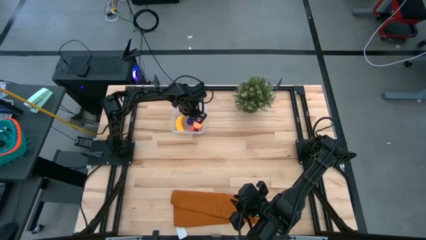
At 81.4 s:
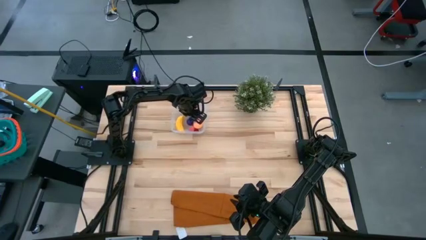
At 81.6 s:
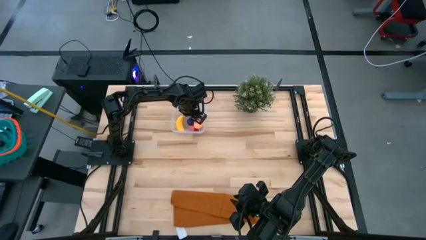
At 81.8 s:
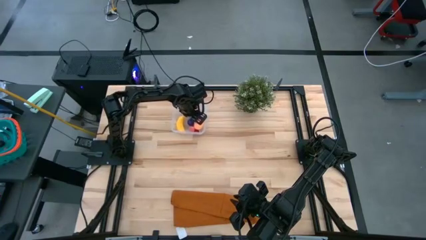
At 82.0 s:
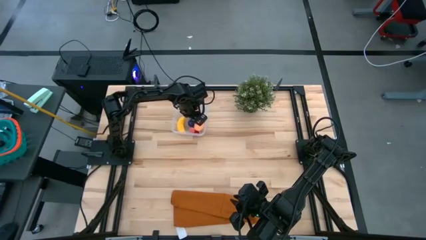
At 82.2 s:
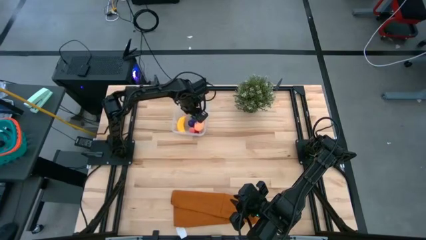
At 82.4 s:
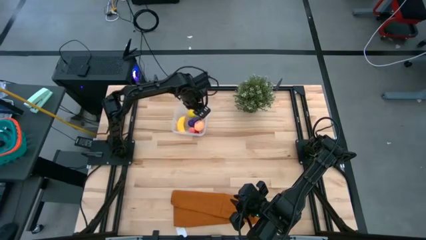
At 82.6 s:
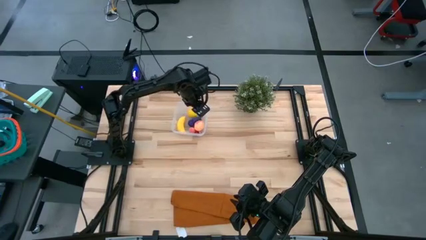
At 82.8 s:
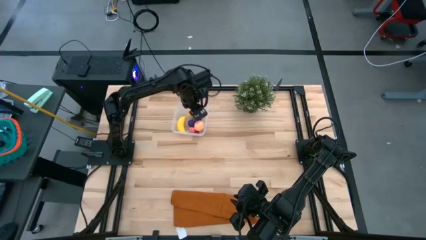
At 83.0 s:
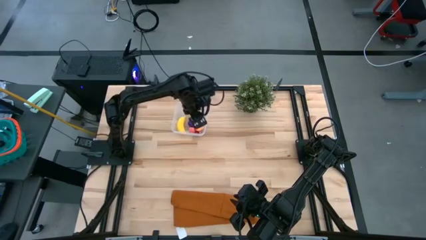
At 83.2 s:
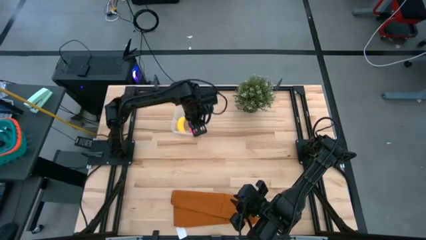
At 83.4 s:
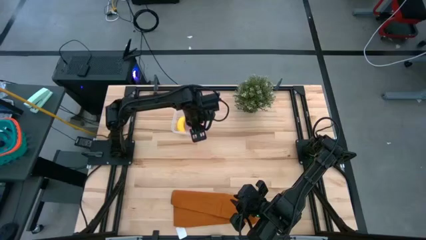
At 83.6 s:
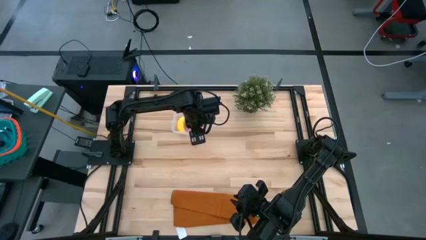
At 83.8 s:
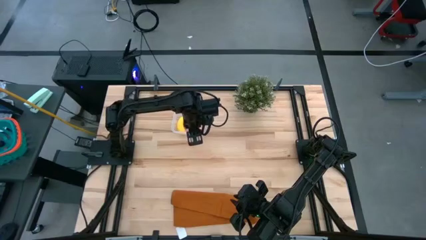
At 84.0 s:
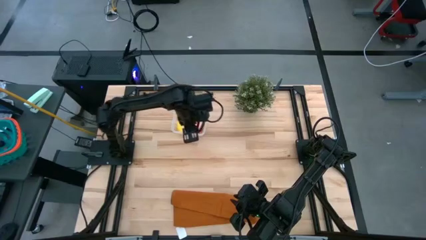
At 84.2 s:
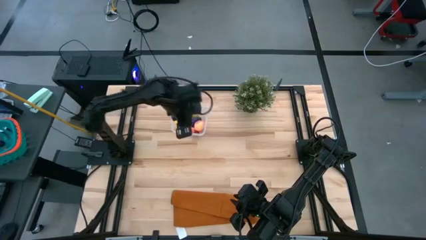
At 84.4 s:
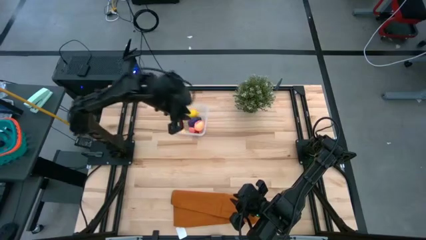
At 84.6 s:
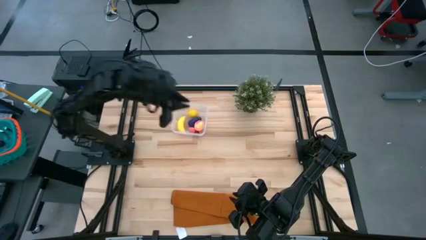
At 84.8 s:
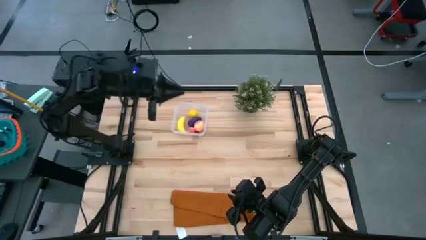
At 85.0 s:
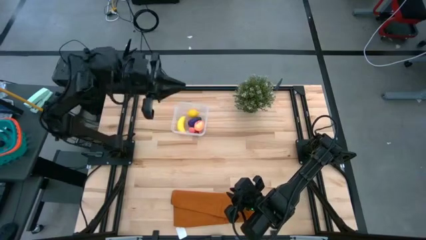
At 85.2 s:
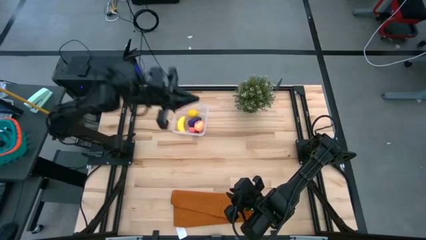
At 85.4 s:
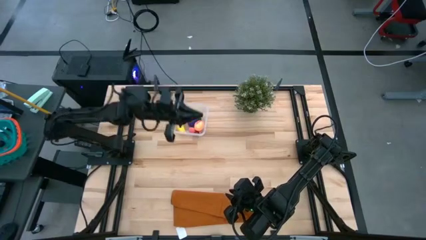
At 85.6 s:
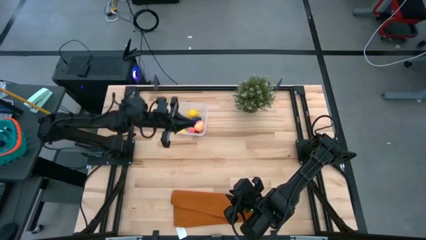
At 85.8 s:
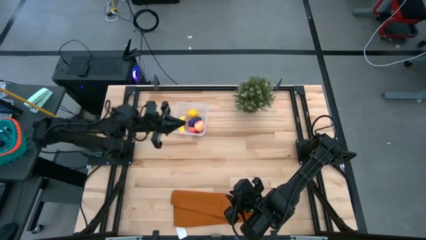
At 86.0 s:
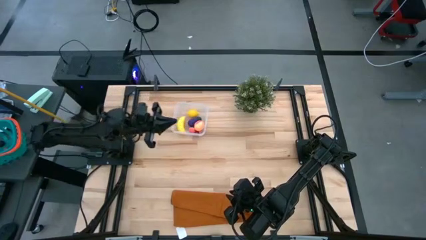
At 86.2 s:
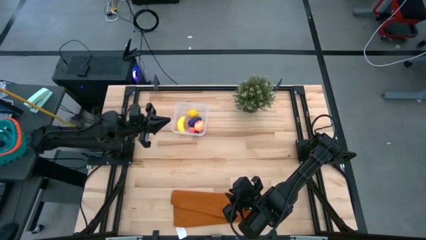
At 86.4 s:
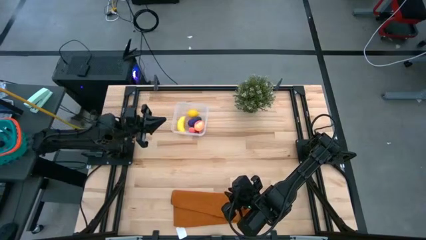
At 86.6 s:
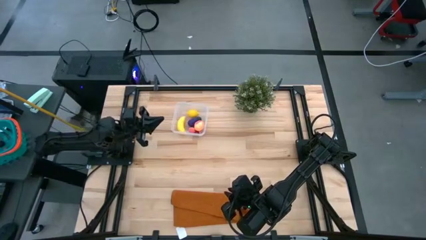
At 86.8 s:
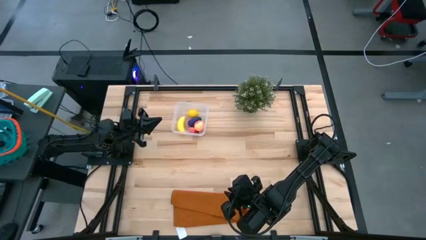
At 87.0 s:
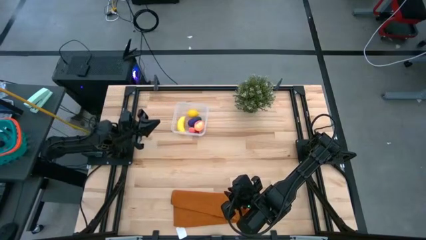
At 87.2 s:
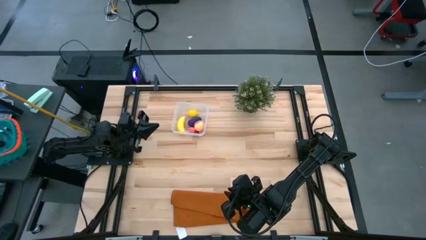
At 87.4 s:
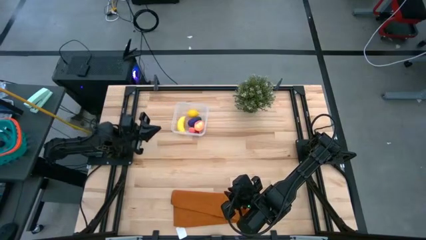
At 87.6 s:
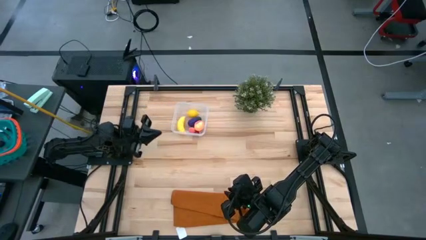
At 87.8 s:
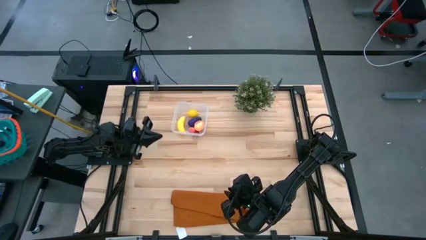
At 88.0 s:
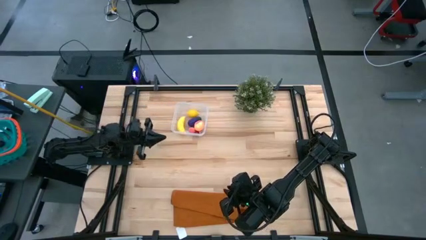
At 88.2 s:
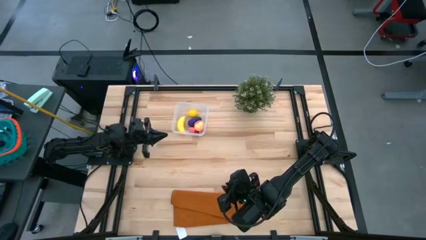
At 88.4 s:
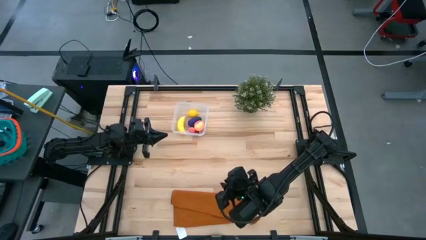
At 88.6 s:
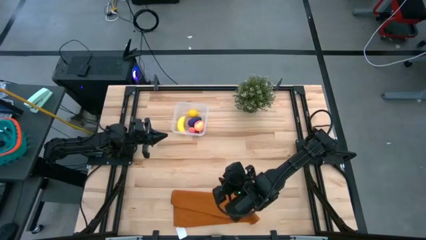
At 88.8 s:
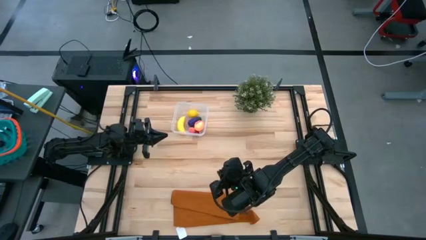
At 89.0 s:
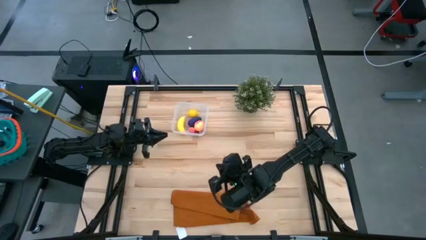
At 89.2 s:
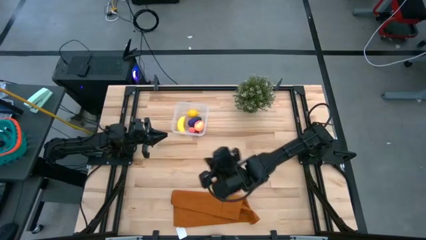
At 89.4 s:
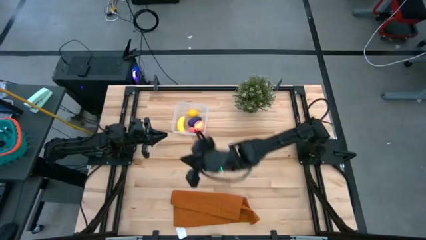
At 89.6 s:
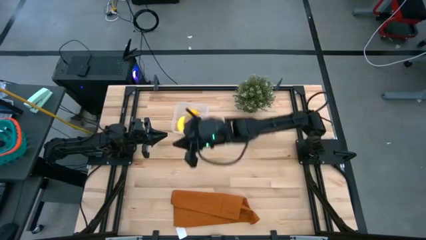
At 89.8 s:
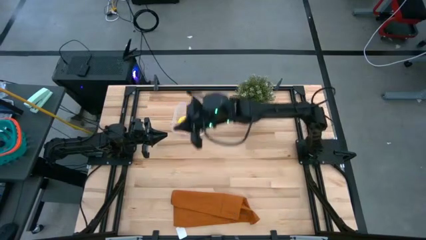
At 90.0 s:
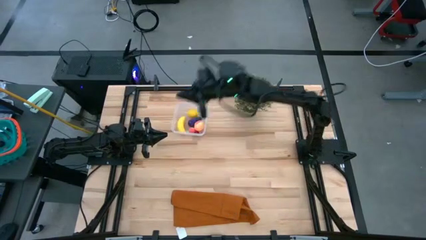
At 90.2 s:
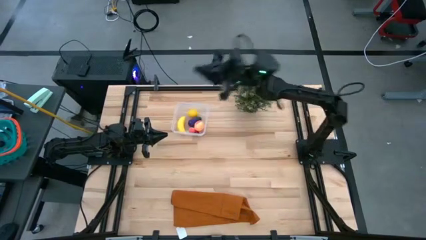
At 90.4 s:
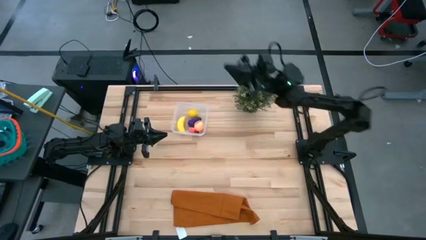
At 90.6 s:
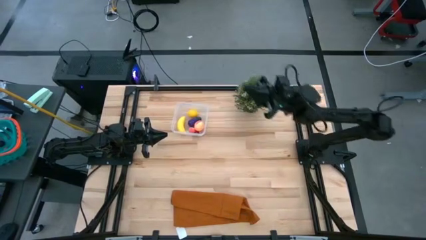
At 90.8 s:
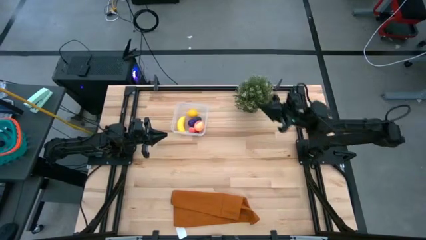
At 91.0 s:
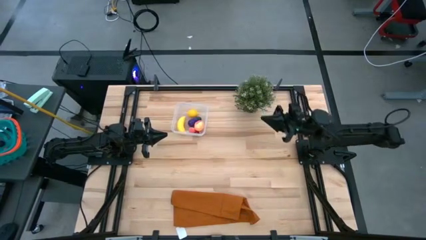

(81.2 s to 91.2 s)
Task: Pick and placing Produce into tupperware
Return to Home Position
